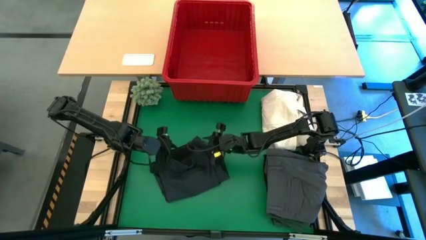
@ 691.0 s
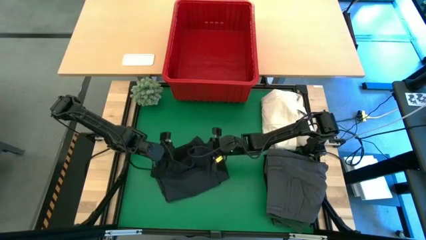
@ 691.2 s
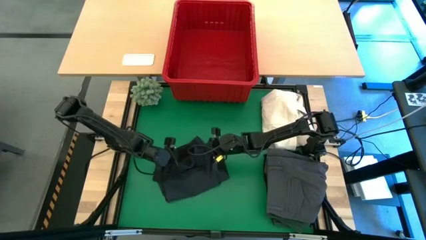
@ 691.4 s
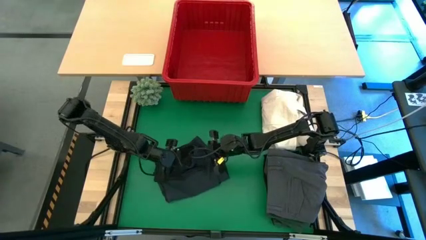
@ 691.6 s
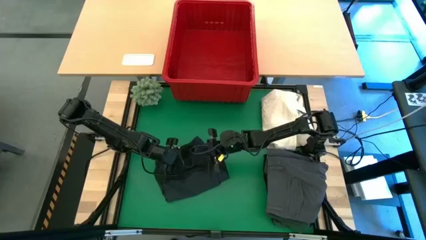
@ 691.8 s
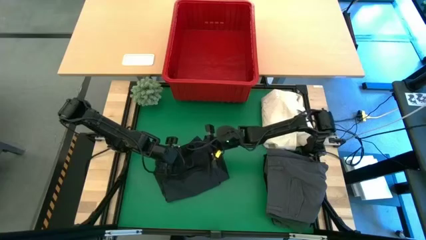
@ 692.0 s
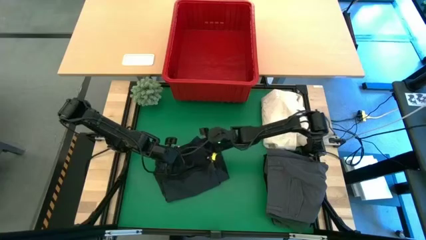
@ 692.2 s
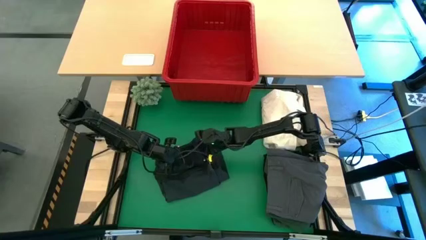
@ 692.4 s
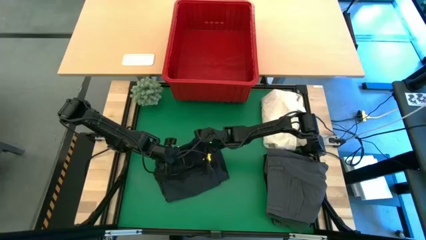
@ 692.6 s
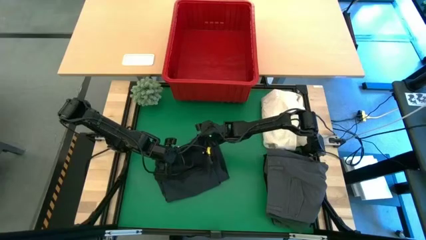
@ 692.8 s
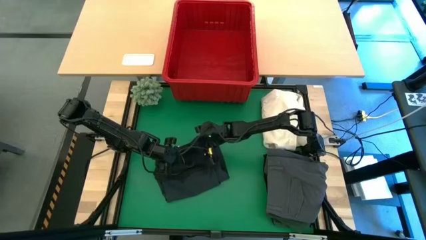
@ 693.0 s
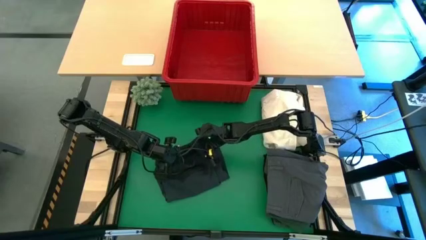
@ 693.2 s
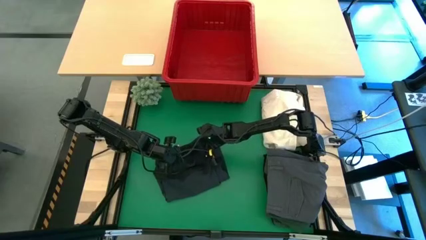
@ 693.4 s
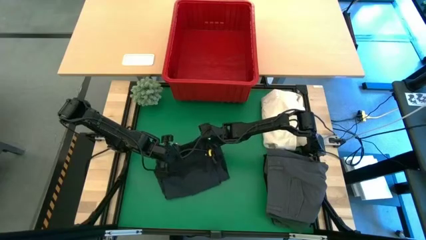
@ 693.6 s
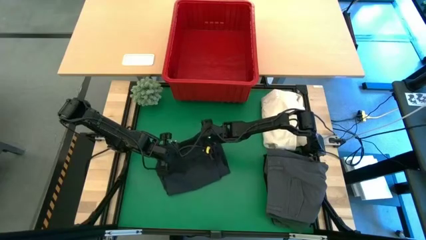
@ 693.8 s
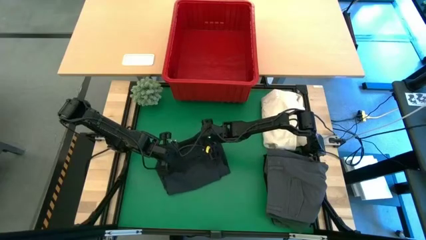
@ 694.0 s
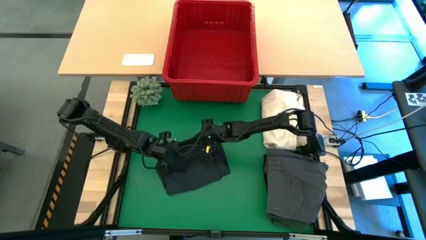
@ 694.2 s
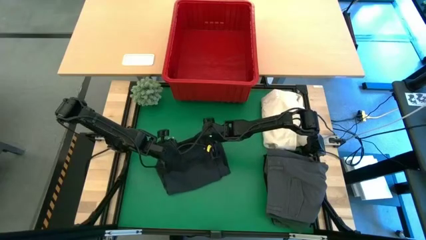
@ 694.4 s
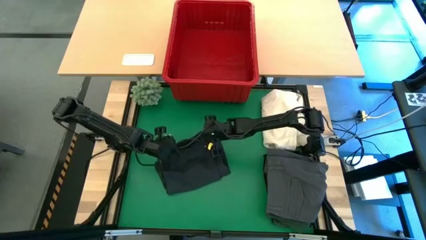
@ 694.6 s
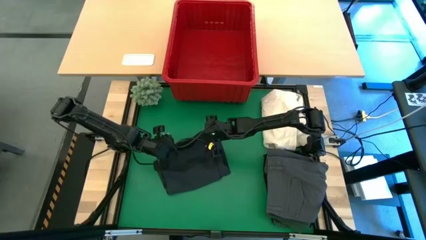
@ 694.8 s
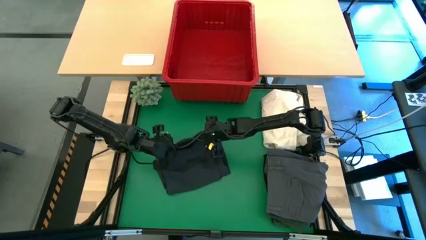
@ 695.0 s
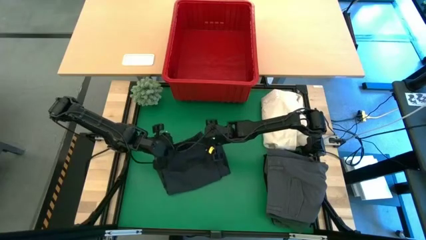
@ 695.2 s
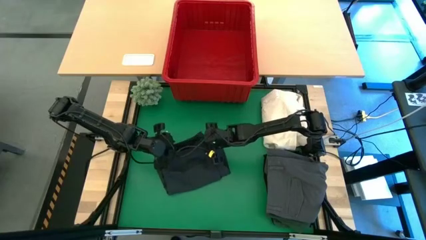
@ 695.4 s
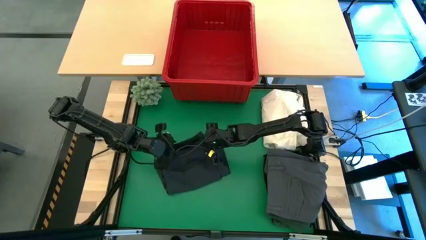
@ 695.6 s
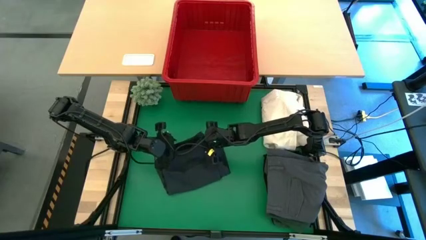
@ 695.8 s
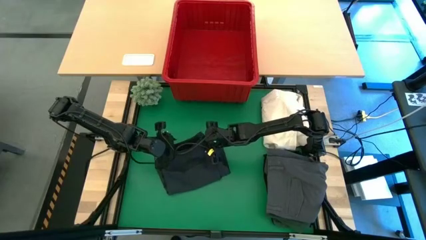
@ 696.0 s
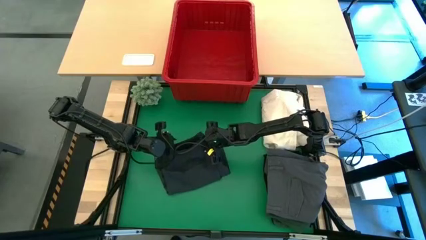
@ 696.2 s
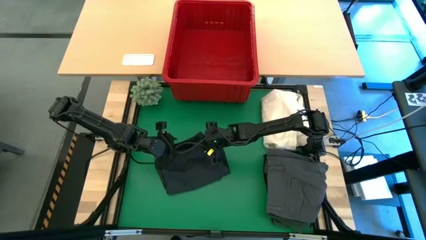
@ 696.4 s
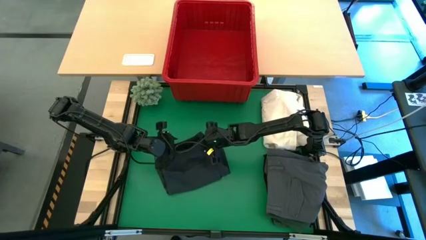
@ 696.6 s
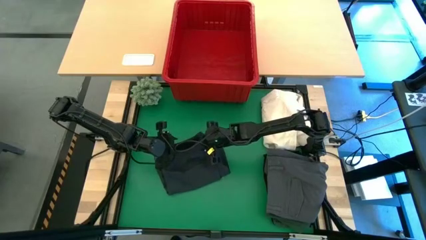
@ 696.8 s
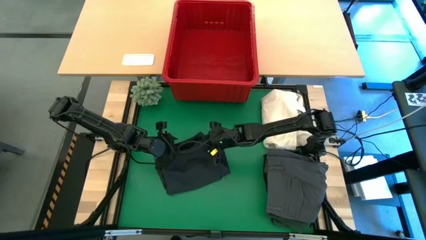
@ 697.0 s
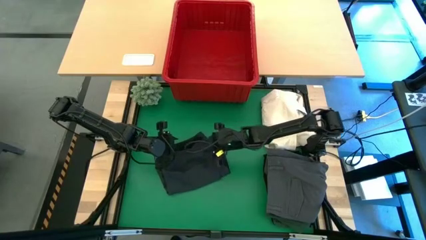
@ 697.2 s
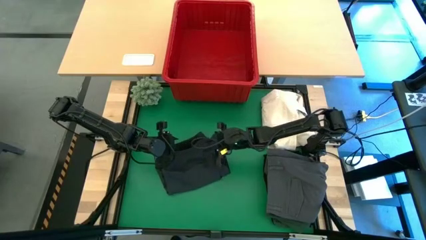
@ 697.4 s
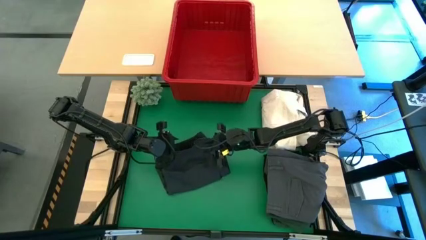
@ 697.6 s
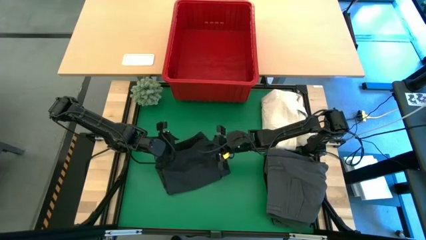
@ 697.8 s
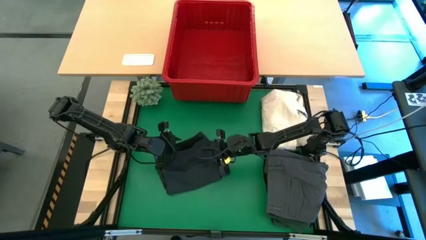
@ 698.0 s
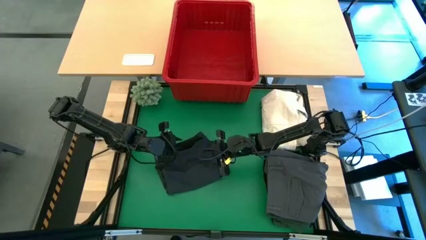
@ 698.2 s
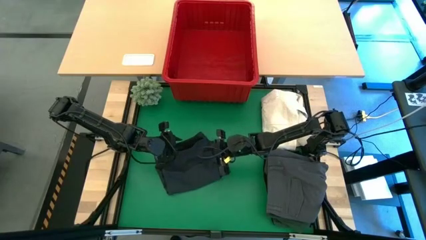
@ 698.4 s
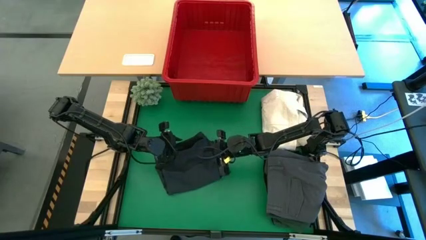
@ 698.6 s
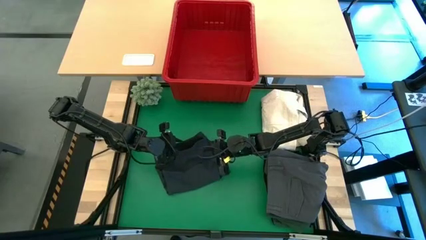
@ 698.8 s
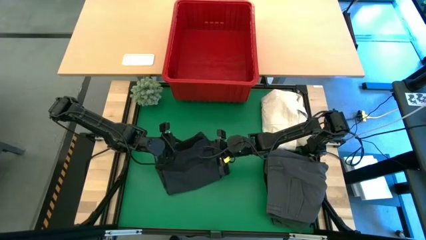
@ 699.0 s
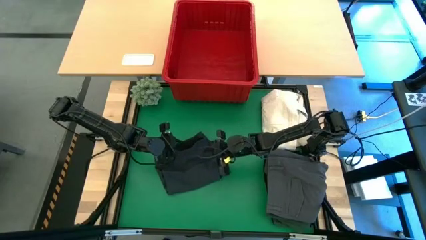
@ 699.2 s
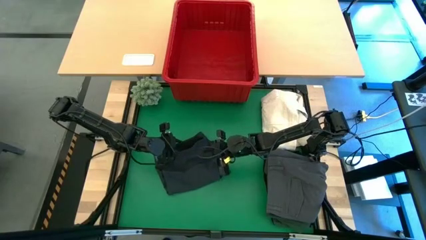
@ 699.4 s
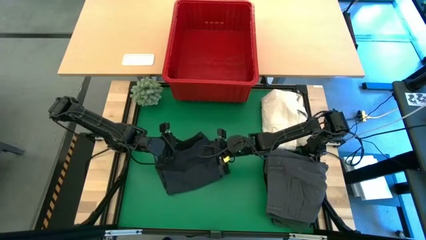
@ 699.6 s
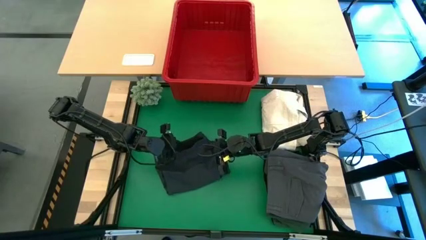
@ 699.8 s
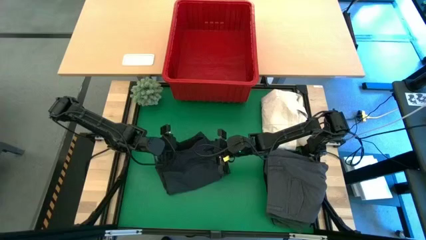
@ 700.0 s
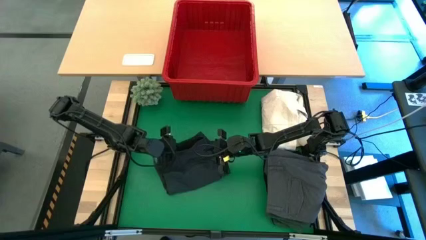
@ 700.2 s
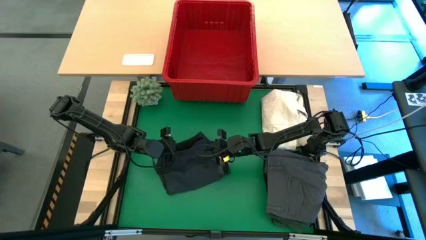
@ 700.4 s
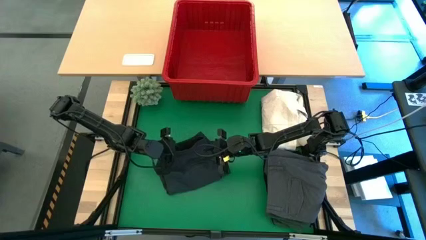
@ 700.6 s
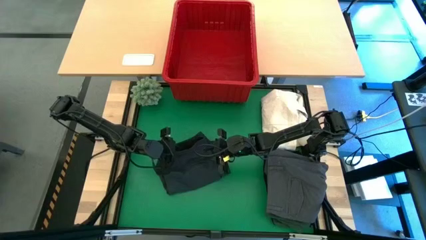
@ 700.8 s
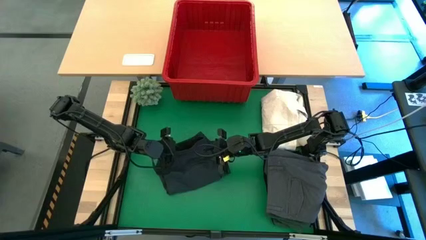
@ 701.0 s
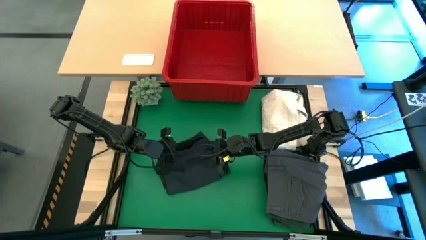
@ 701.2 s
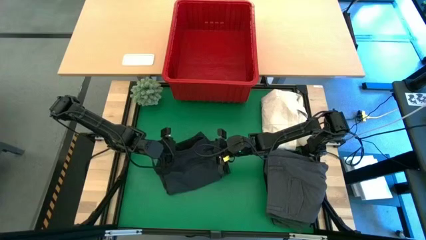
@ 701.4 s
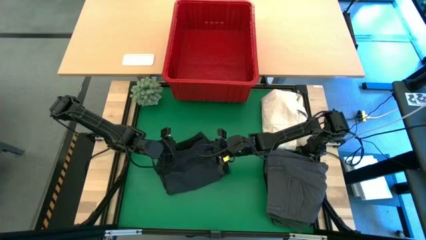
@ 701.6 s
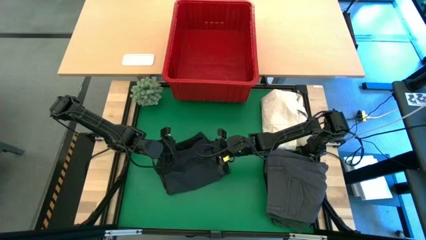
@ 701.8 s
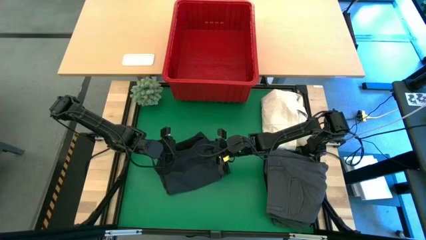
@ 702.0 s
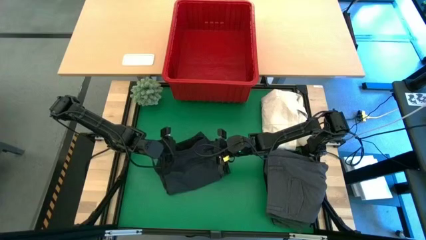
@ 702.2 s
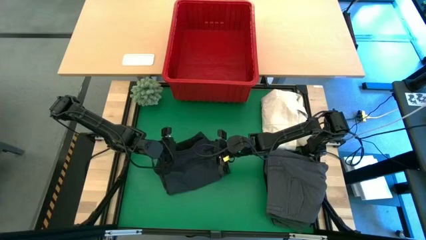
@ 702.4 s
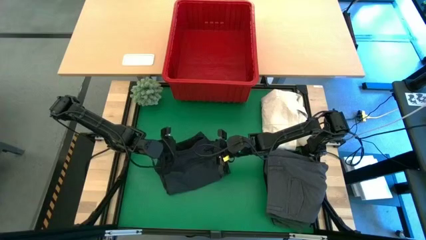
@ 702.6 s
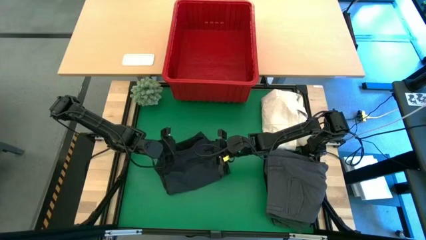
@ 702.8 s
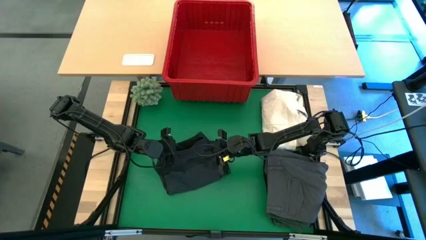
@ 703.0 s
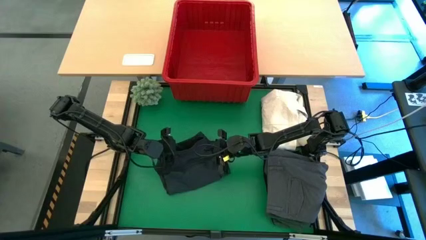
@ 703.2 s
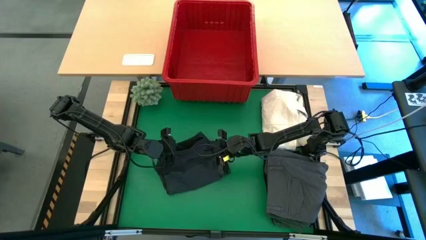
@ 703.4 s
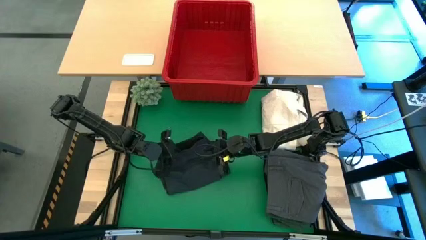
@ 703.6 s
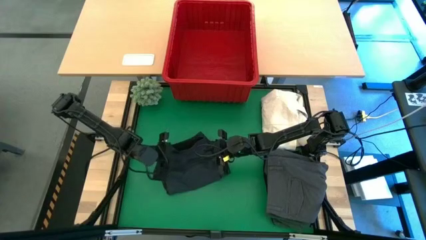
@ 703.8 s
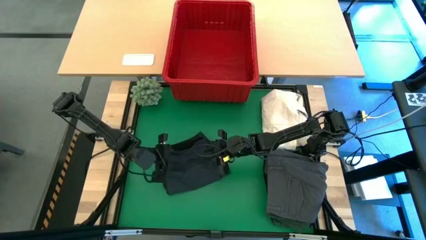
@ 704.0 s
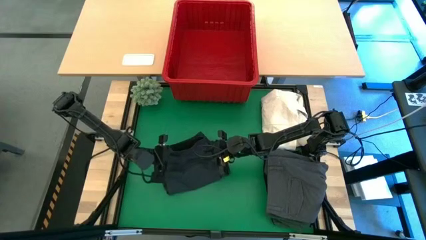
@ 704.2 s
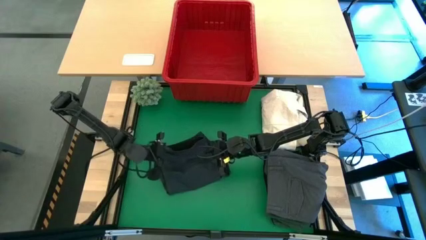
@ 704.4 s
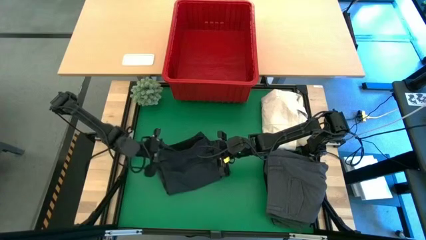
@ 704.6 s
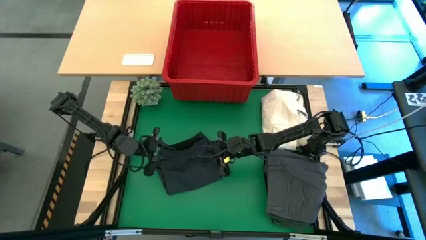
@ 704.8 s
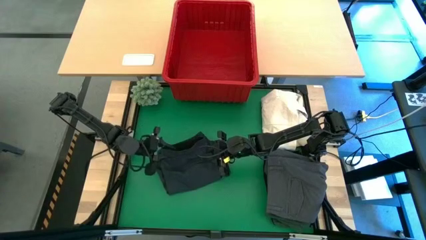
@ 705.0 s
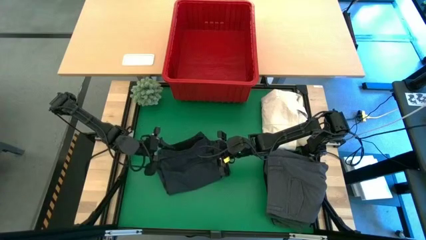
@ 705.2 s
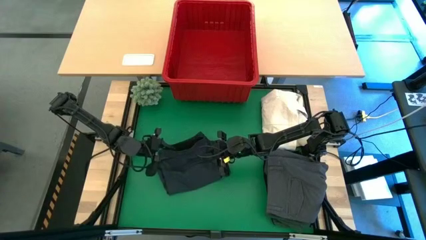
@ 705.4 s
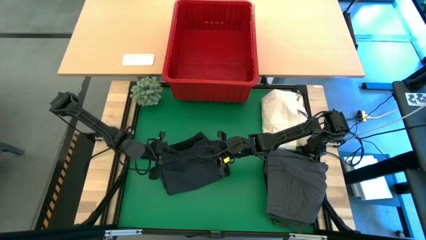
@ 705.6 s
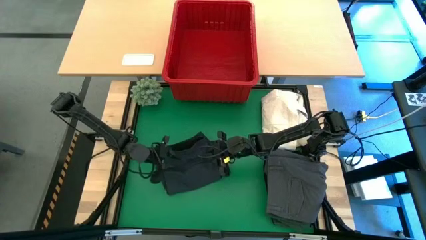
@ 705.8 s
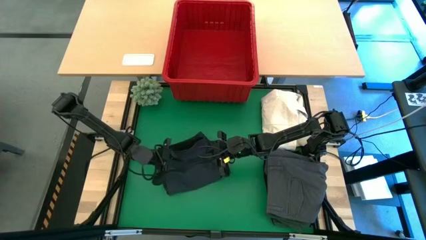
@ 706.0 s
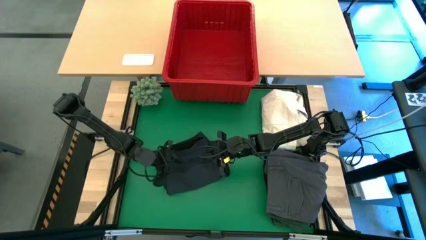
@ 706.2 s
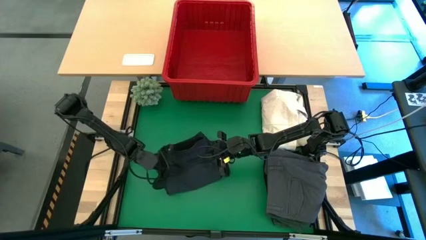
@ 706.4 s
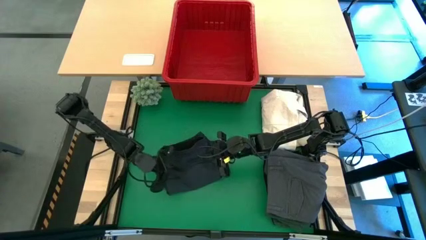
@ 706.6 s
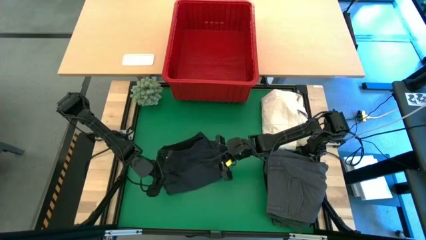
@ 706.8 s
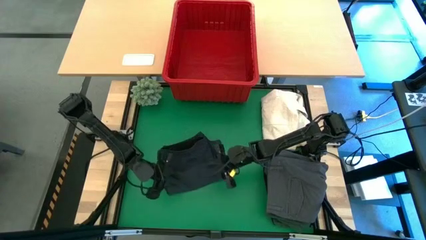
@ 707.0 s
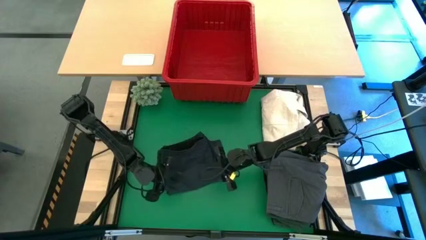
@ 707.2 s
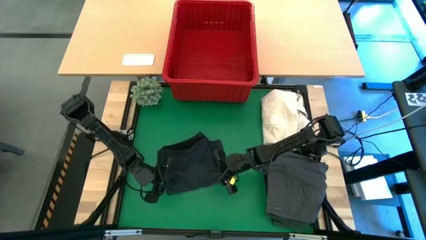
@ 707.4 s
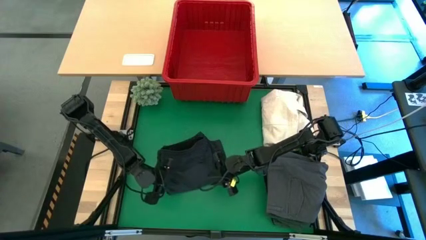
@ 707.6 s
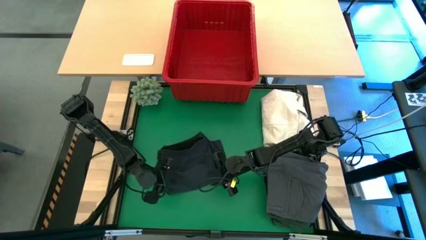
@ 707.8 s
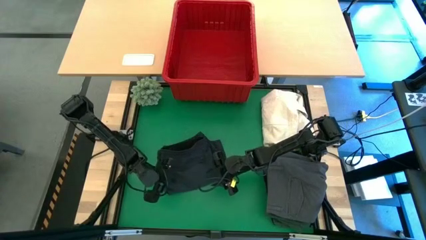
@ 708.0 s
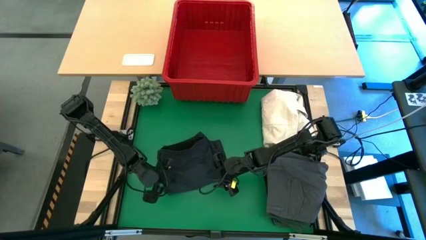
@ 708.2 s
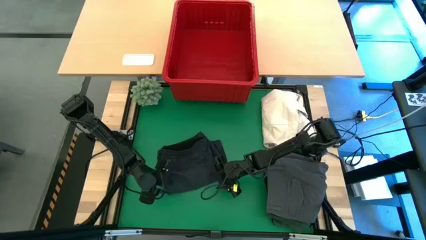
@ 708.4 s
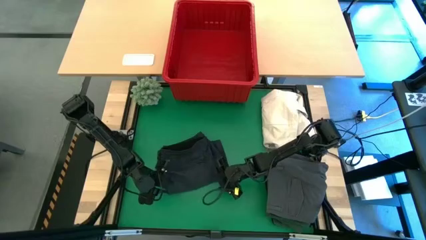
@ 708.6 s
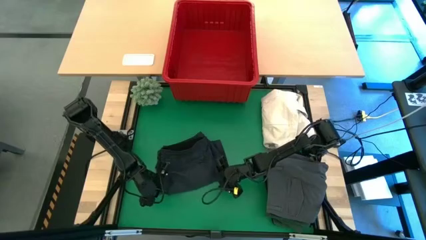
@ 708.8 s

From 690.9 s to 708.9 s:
Task: Fold laundry
Fold the gray short
